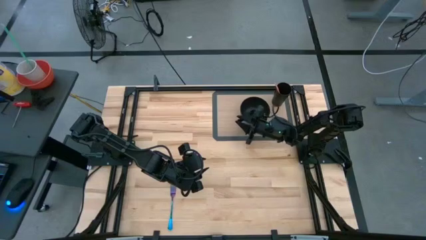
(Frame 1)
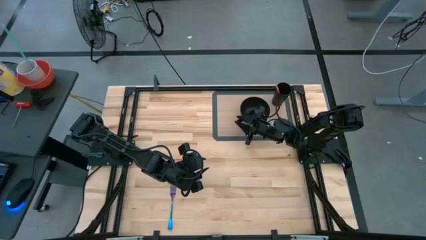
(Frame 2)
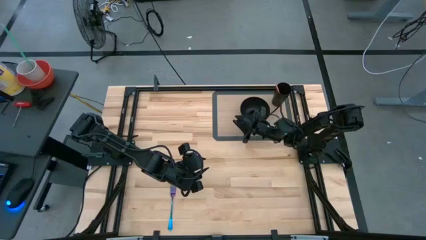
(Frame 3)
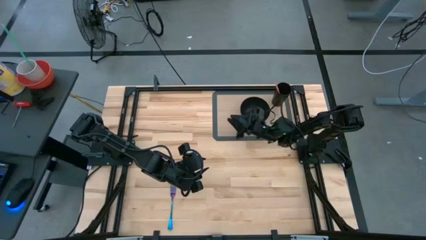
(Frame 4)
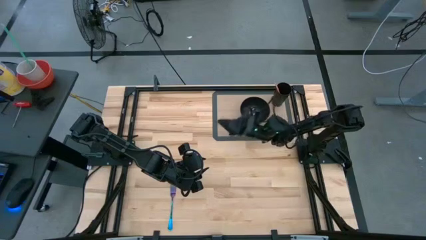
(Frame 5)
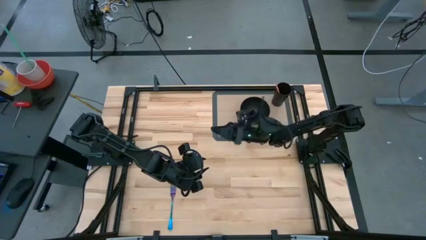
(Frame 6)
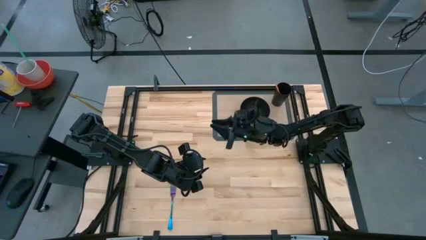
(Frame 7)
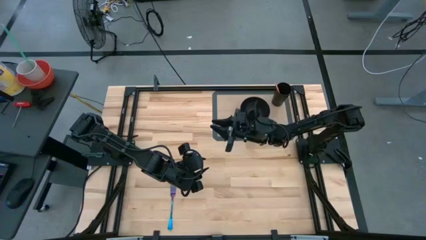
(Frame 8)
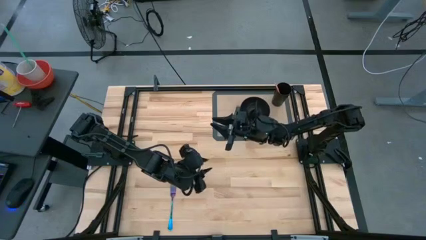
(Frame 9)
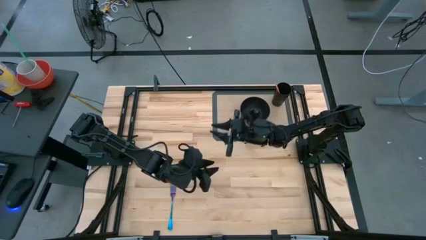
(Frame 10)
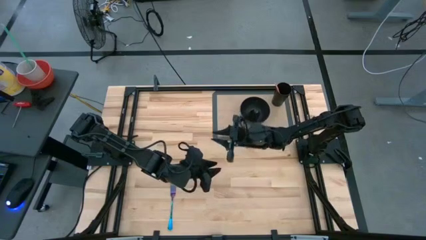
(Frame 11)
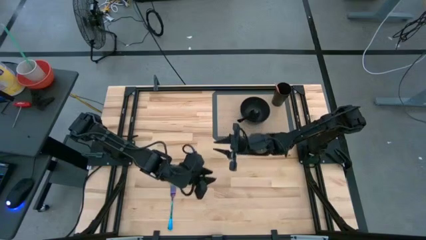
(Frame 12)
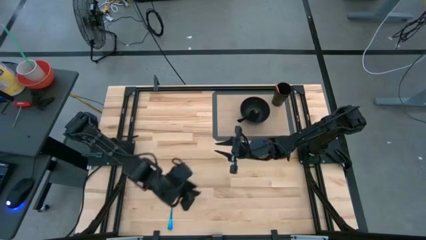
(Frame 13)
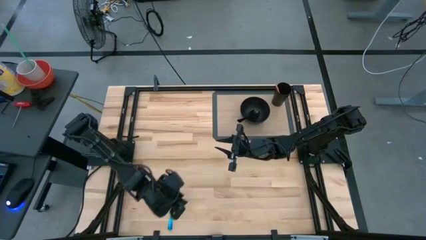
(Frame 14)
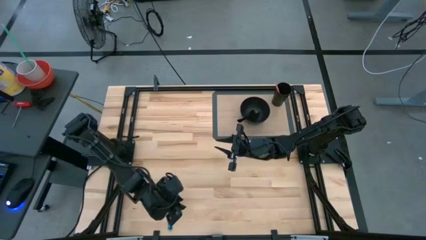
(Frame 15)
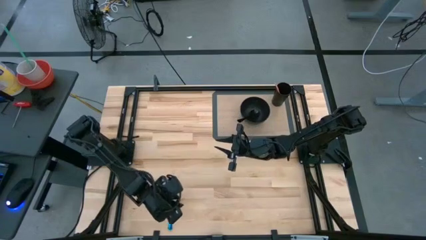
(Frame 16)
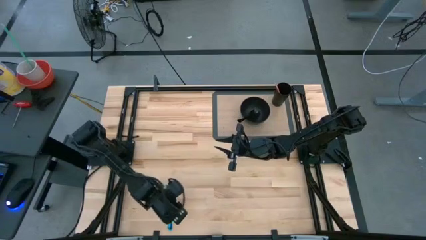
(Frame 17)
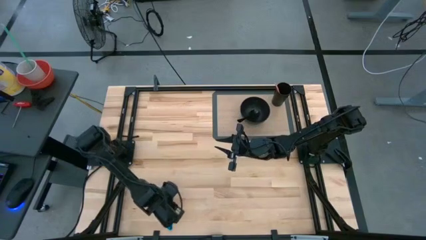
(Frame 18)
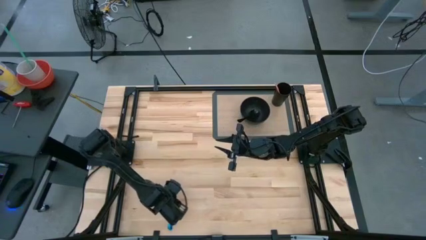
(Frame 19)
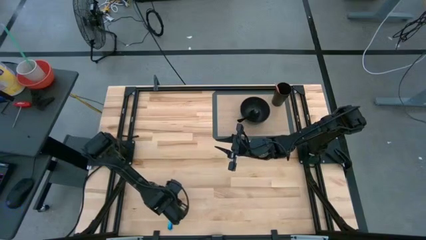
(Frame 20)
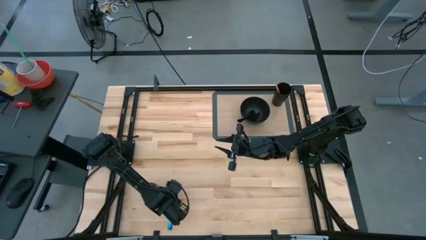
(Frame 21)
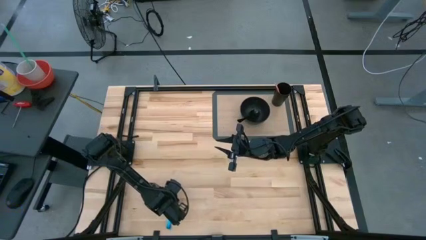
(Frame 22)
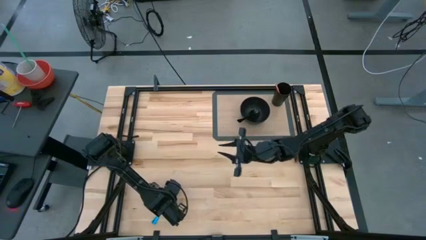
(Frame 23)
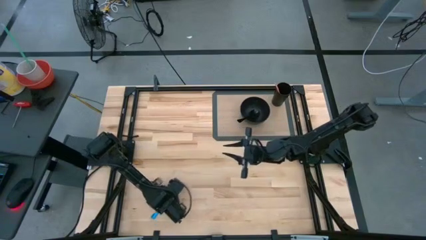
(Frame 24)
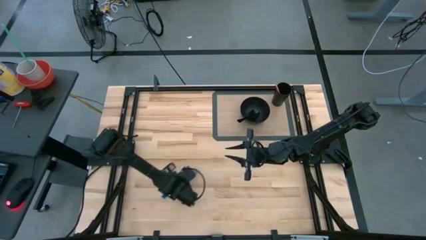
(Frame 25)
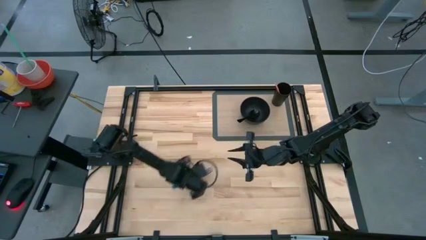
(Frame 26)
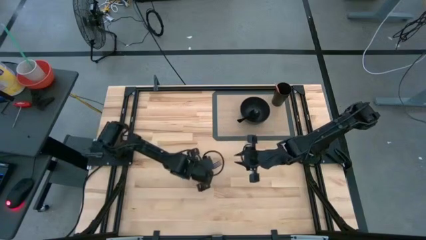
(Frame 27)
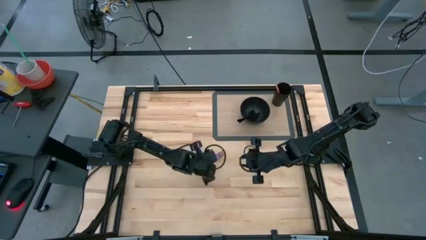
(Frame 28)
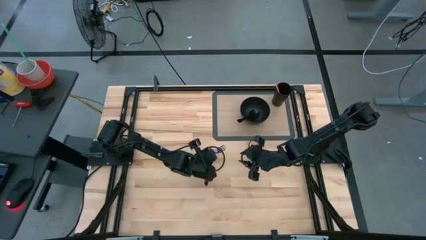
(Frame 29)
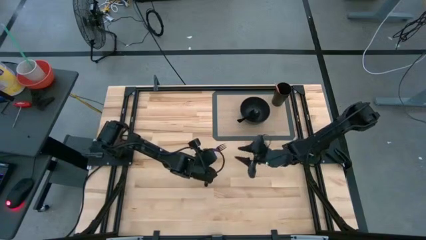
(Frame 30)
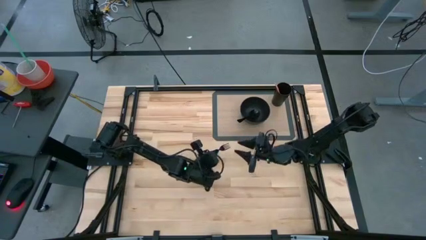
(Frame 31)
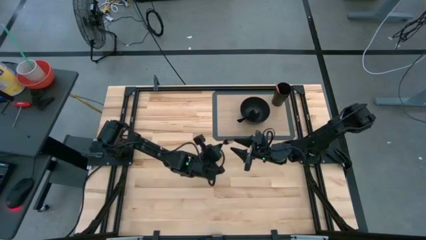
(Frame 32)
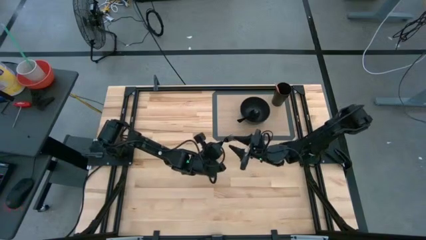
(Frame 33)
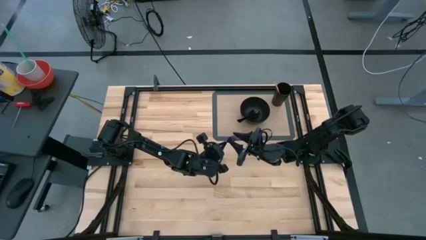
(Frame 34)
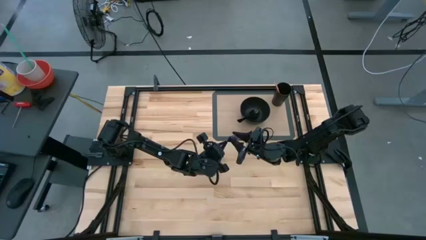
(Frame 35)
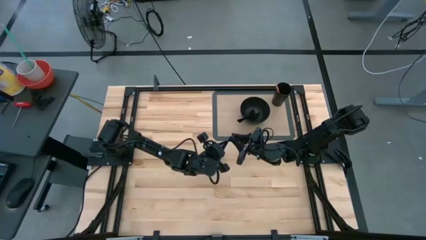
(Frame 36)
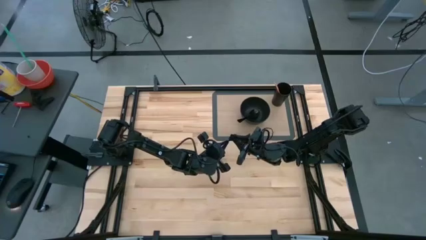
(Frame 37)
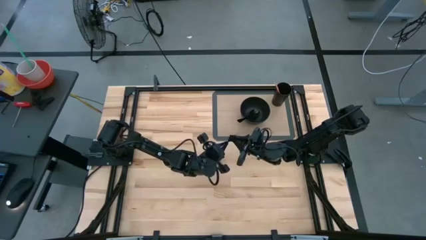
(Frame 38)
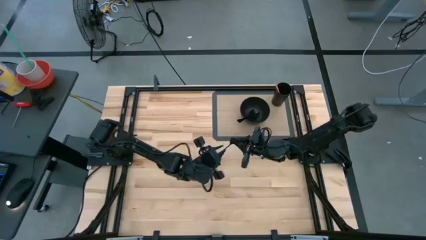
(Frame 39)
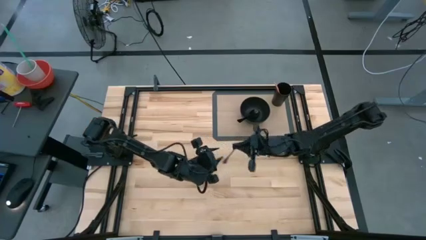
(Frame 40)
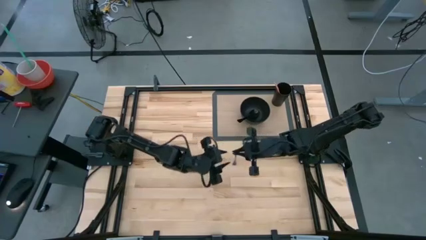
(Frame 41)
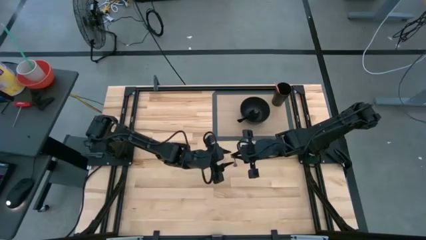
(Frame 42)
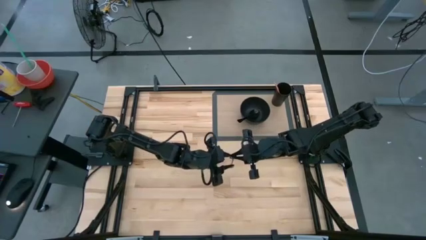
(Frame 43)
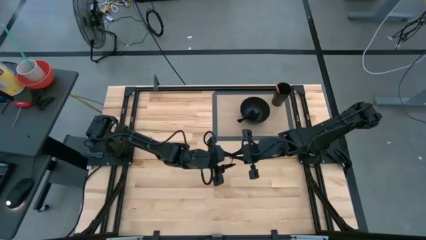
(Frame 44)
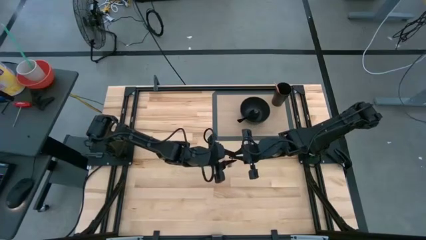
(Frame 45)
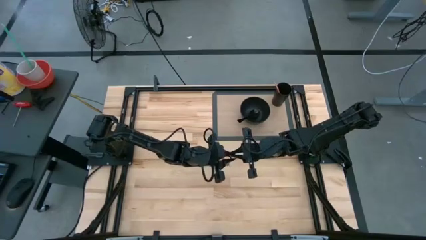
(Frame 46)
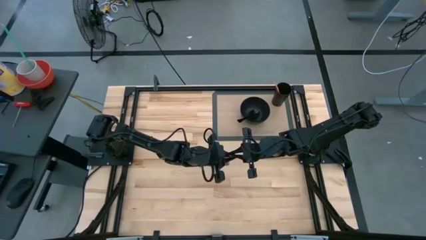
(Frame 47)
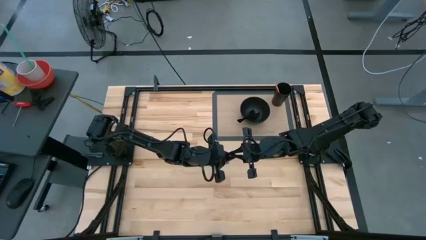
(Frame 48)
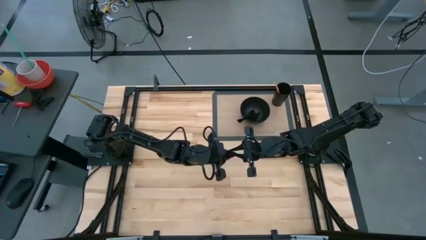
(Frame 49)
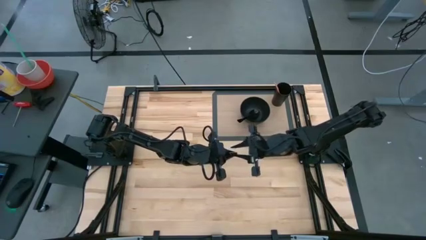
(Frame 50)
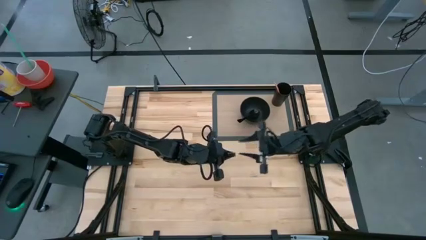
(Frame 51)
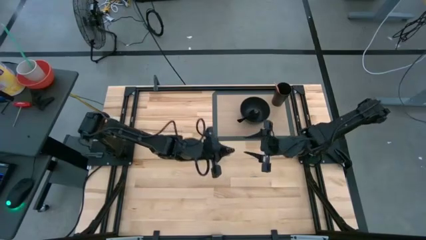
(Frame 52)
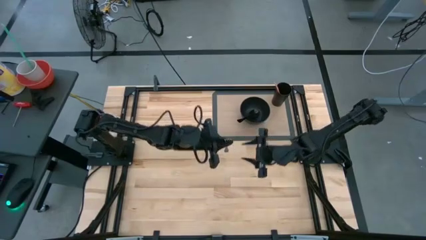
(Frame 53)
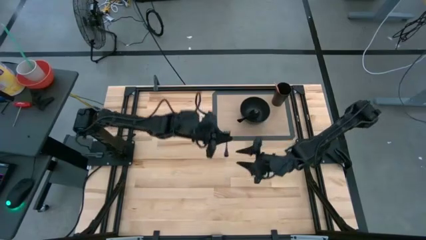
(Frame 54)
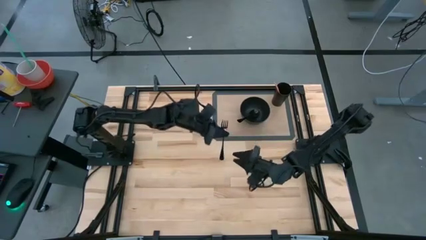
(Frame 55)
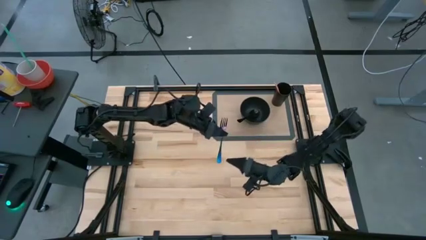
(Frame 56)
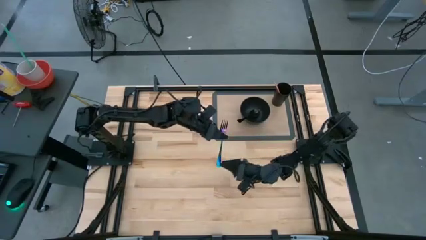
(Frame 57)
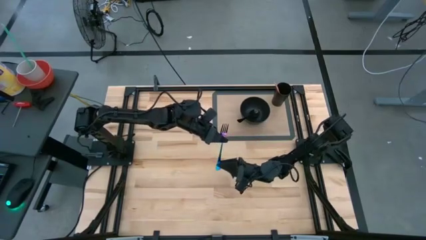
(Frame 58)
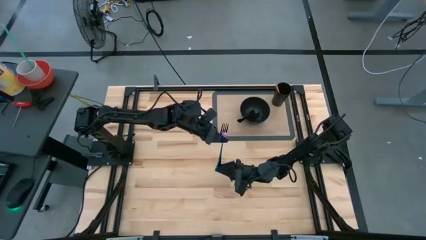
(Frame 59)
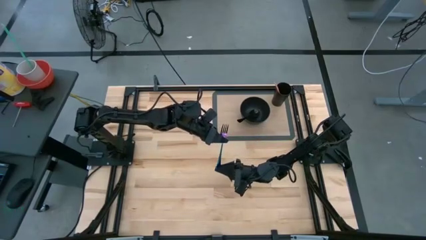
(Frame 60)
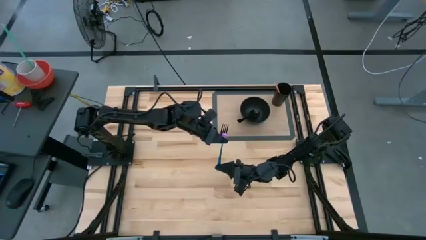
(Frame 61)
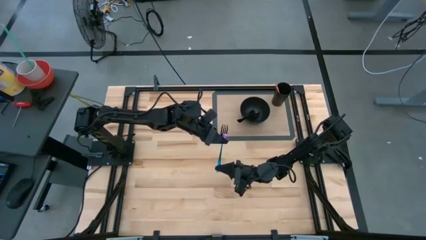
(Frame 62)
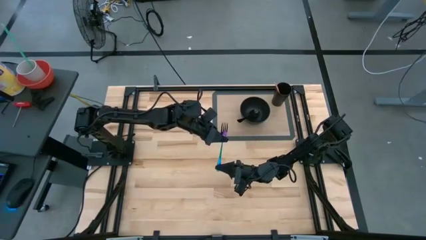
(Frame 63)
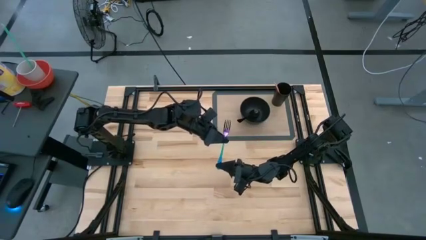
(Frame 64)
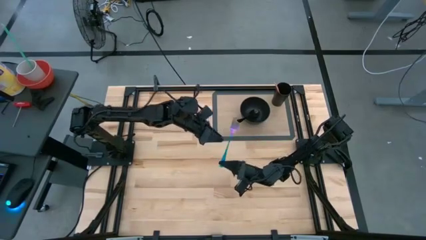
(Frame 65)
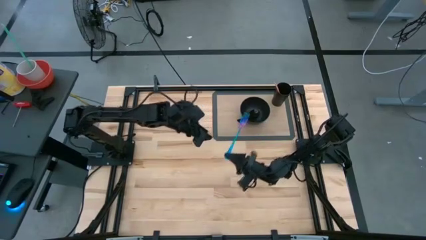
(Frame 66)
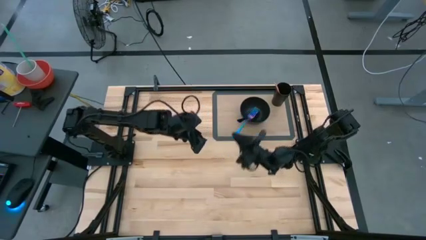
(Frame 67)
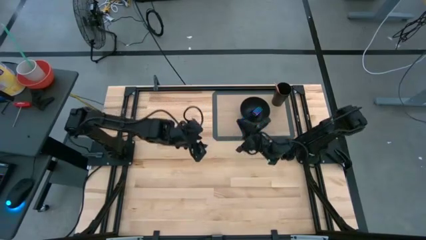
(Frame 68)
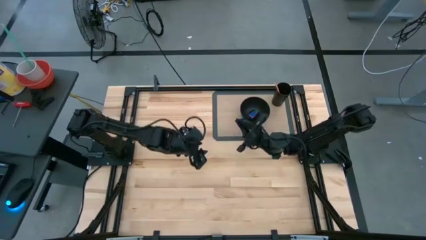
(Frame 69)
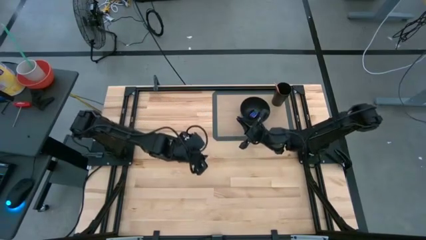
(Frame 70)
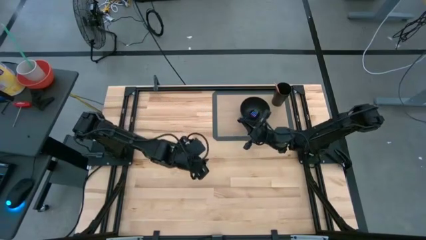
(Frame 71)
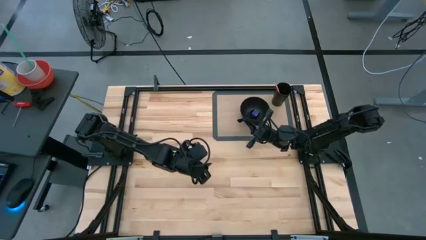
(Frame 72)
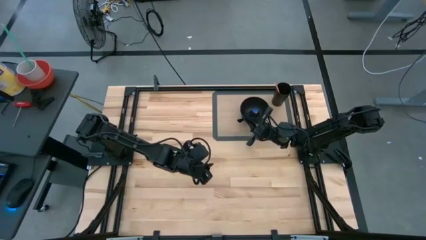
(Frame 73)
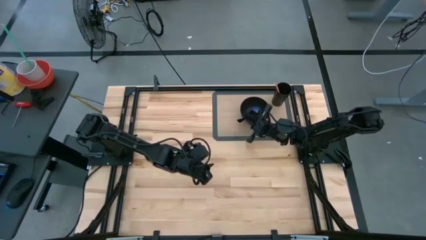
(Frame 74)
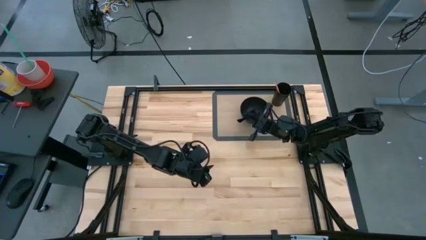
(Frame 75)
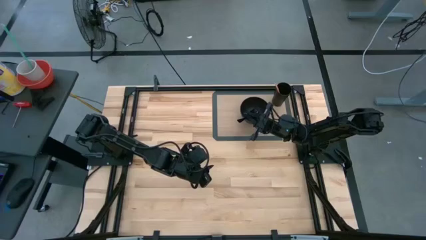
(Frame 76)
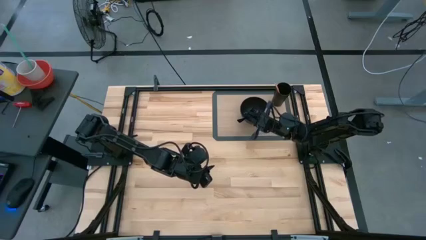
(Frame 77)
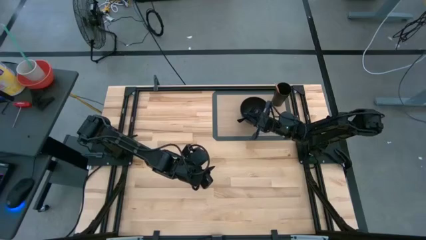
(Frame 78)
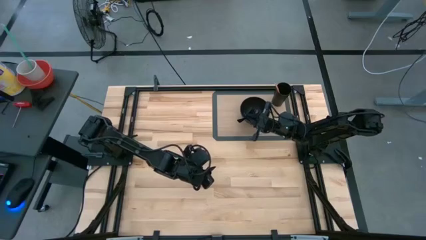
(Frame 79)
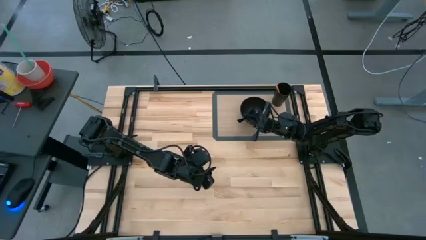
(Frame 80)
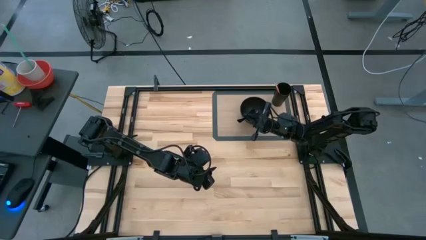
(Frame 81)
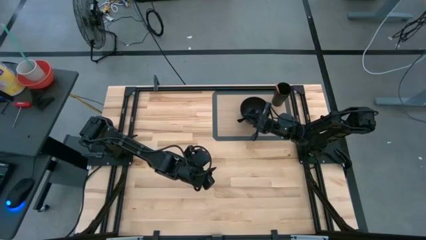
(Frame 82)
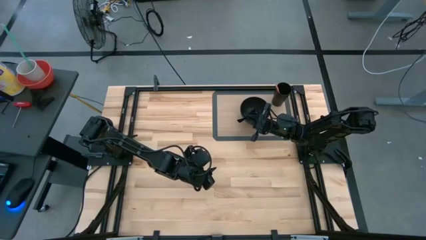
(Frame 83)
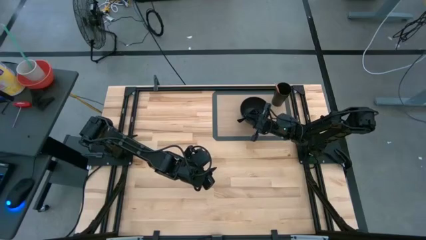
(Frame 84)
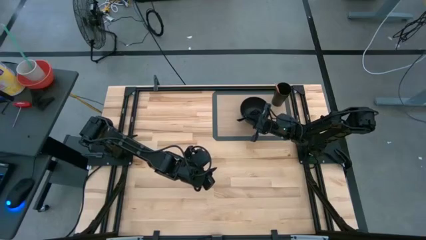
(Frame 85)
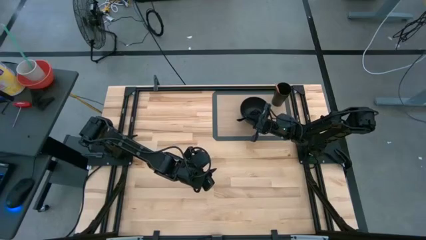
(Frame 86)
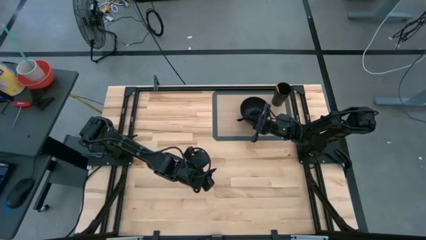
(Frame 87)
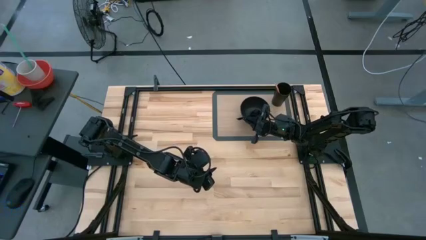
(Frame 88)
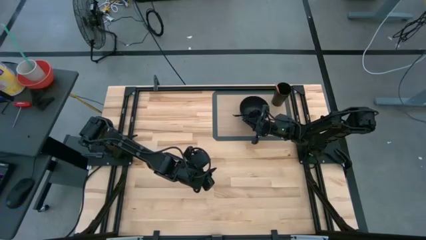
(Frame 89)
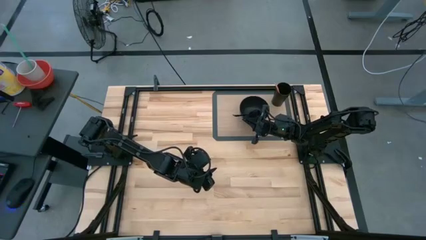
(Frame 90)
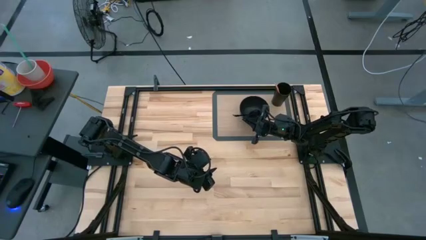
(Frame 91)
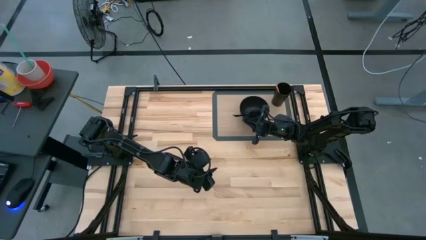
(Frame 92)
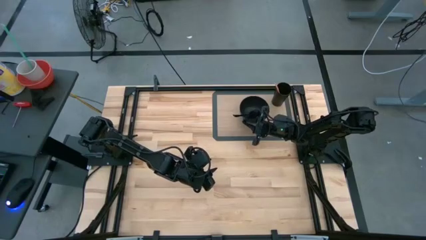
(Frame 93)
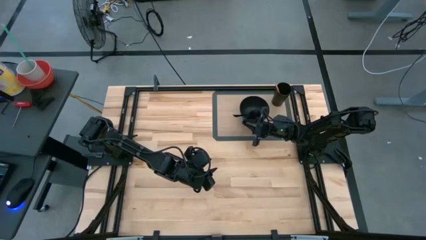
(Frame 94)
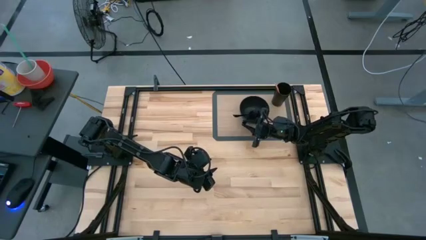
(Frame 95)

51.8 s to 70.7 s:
Task: Pick & Place Utensil
Put the blue fork into the black bowl on the transparent mat
